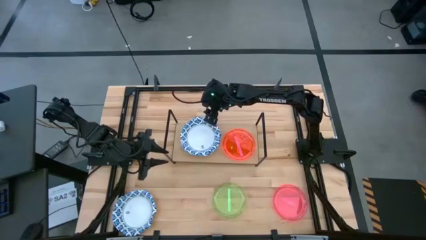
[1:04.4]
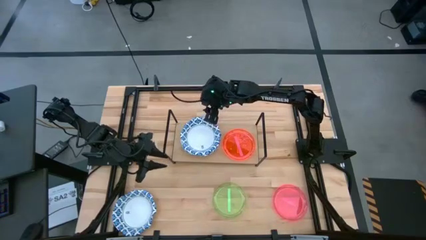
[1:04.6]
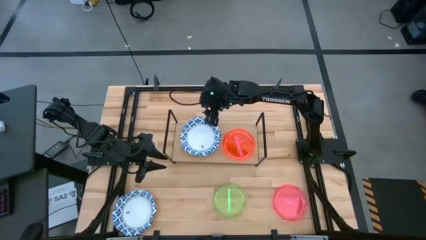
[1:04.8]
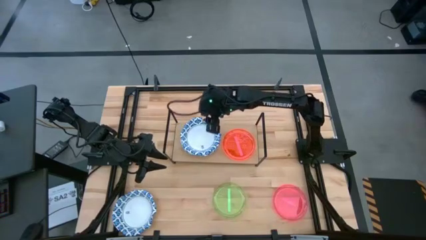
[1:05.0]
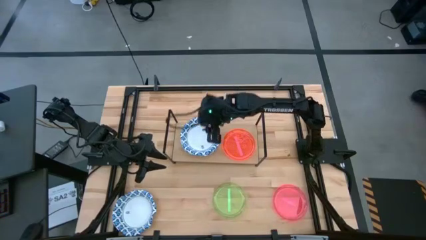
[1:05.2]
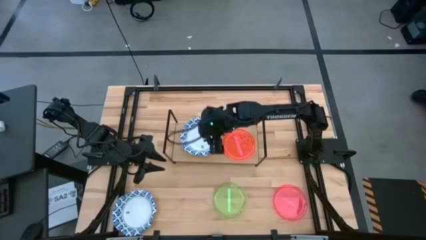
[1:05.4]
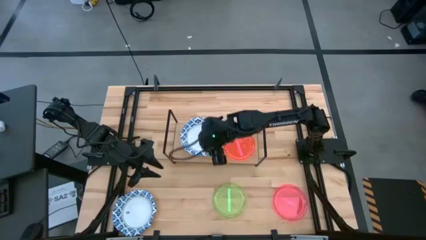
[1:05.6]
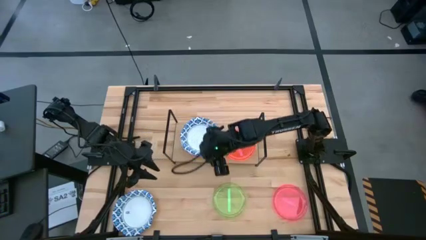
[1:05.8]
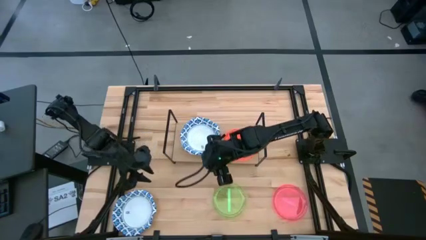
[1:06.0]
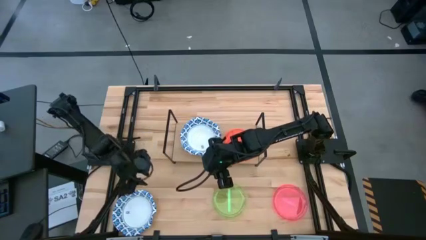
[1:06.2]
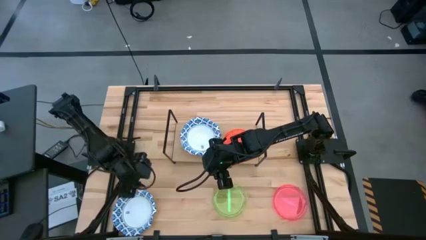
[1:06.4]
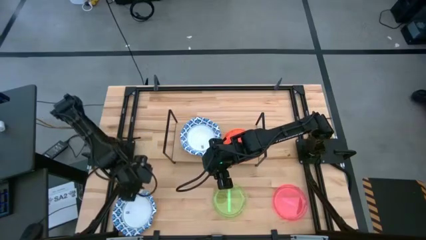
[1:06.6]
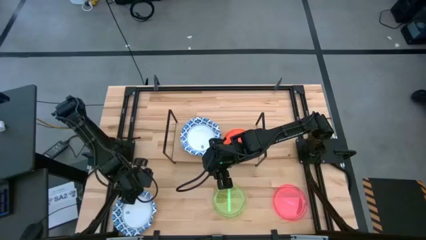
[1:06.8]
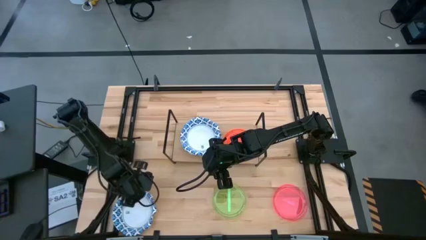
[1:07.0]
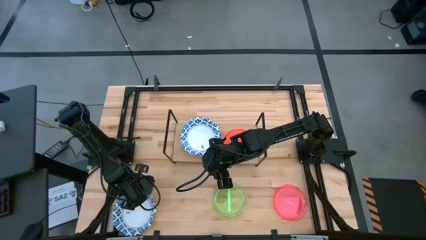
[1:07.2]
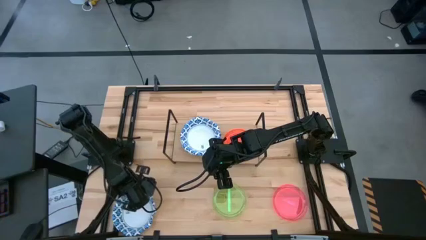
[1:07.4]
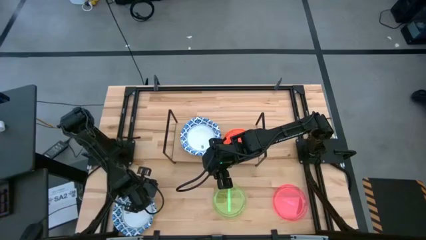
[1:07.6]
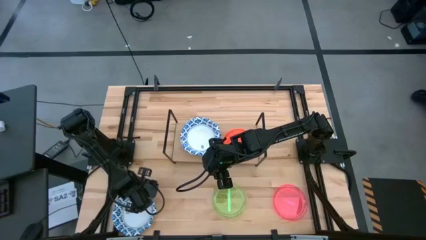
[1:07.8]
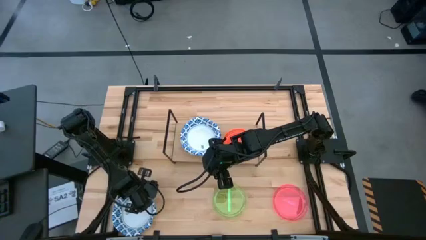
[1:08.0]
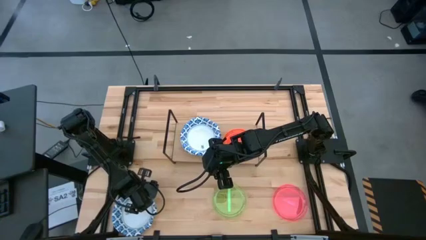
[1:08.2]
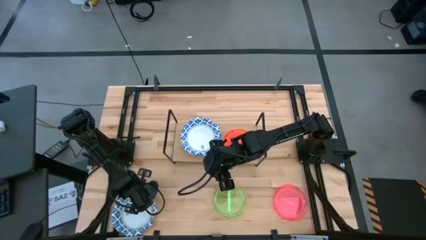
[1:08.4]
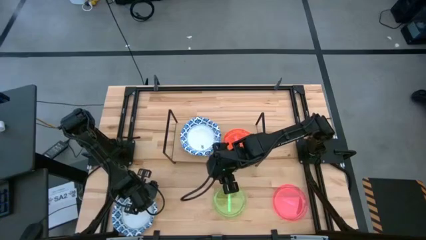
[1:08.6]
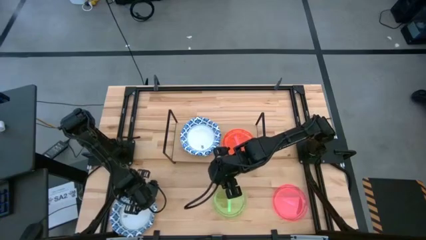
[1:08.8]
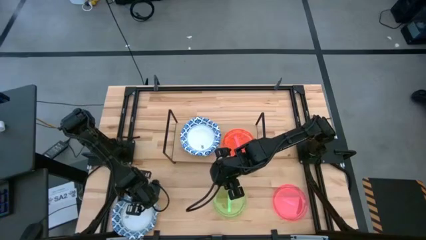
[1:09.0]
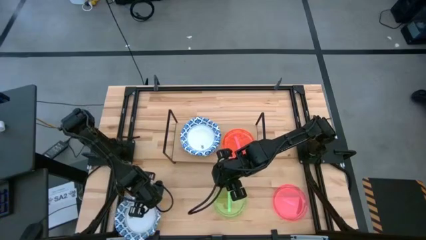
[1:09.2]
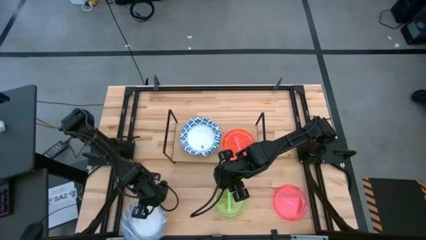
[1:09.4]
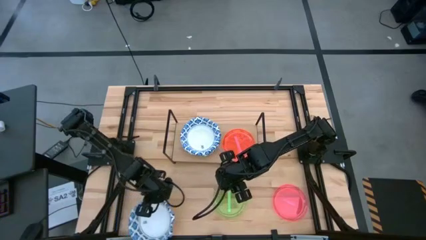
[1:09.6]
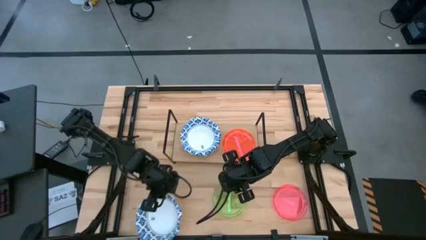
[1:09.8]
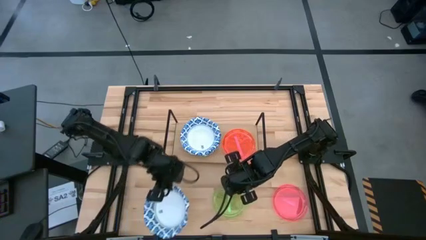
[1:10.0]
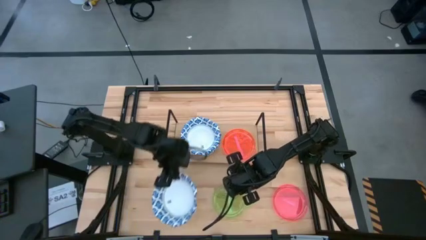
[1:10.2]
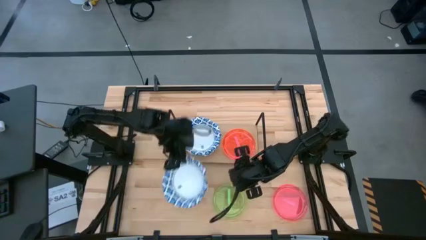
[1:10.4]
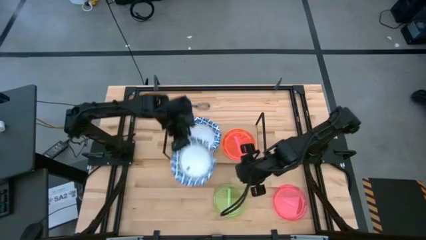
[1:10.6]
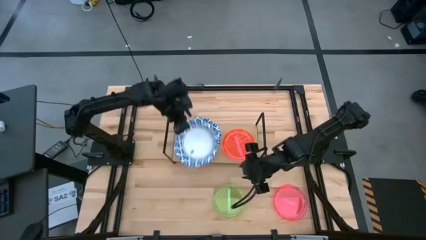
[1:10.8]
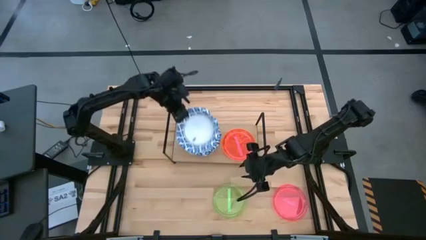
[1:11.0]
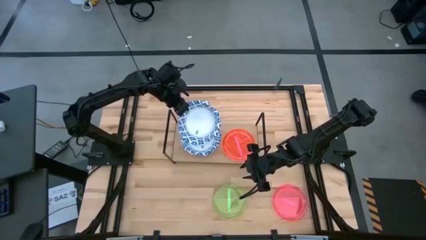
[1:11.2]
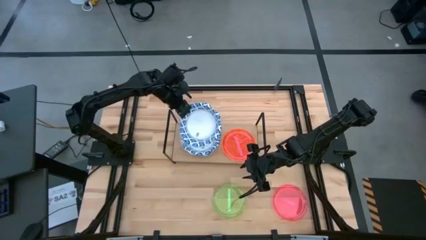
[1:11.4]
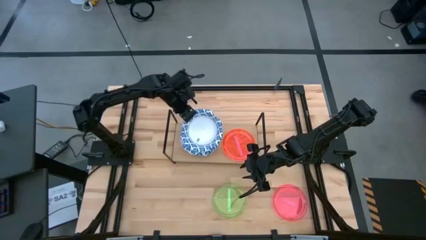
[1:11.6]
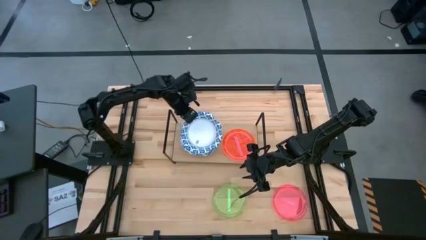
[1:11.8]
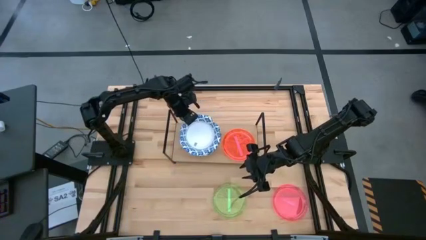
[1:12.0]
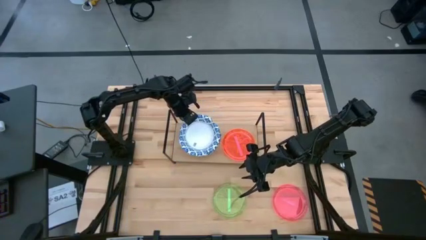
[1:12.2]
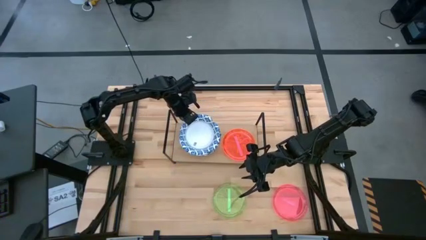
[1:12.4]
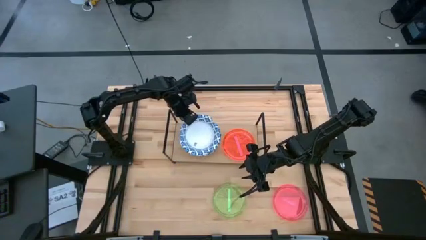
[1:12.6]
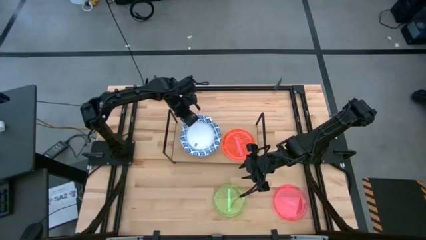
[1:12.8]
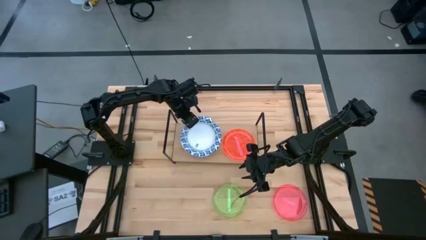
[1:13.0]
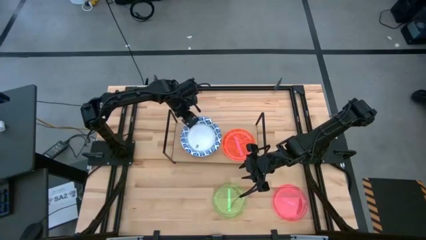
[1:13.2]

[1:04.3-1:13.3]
Task: Place and stack plates onto a shelf
Stack the blue patterned bowl on top of the blue patterned bowl on the shelf

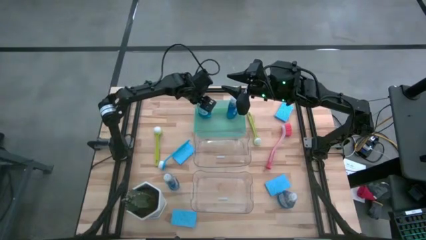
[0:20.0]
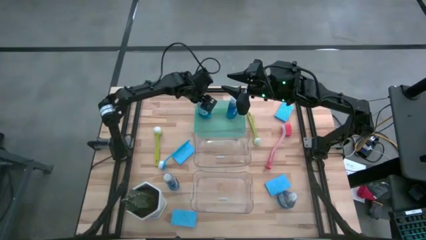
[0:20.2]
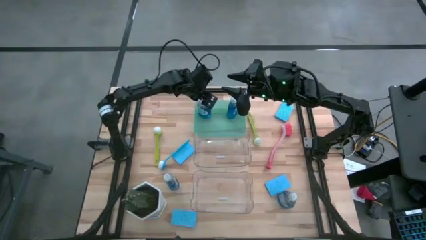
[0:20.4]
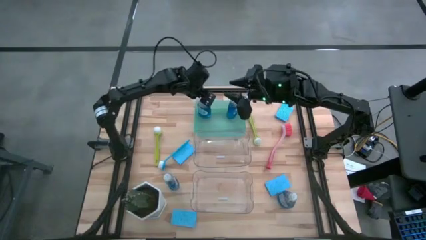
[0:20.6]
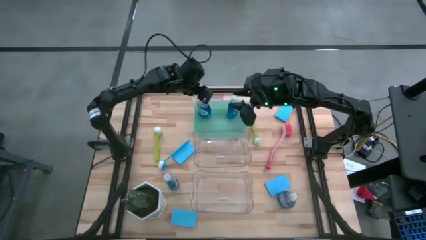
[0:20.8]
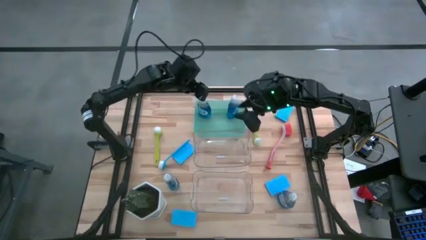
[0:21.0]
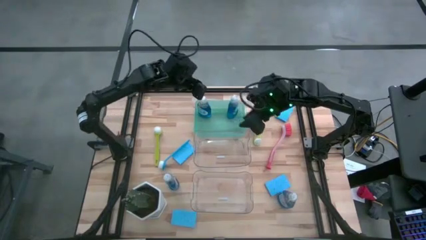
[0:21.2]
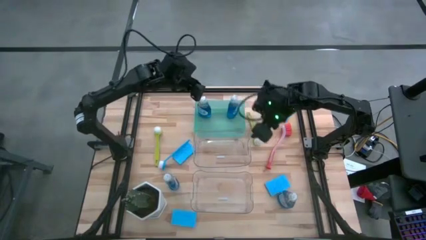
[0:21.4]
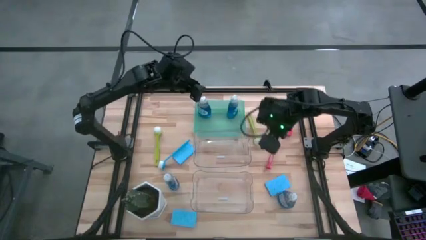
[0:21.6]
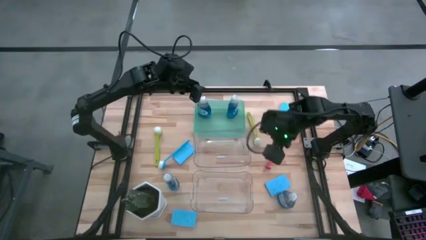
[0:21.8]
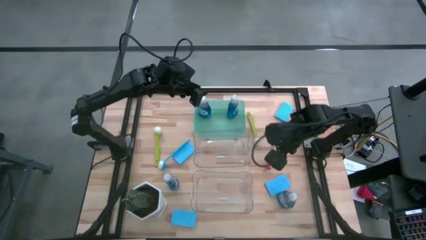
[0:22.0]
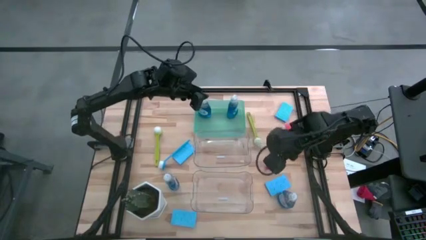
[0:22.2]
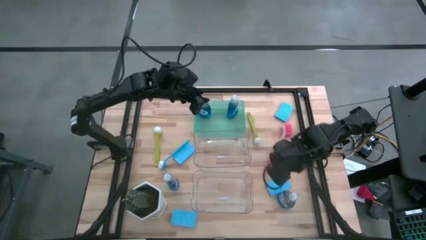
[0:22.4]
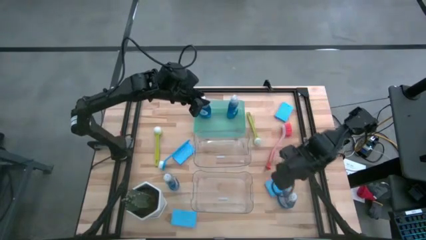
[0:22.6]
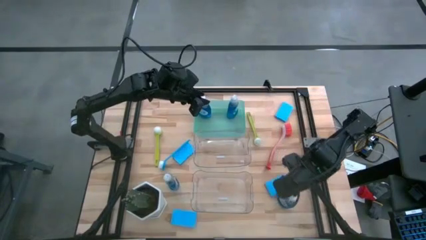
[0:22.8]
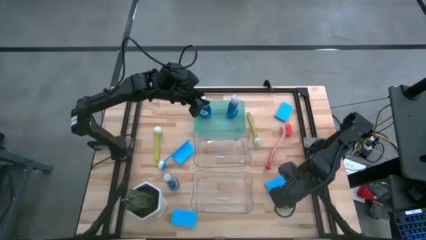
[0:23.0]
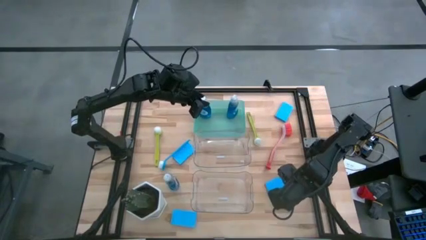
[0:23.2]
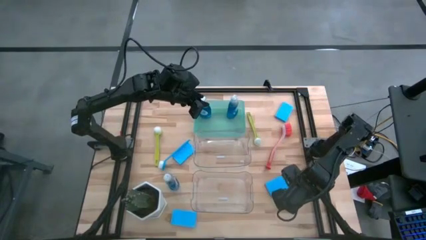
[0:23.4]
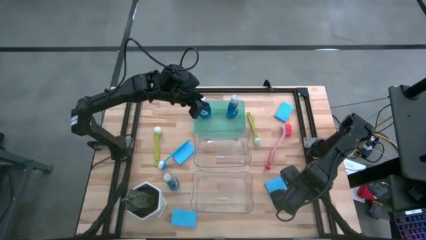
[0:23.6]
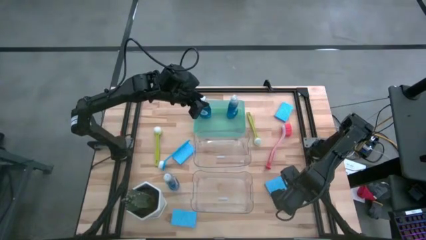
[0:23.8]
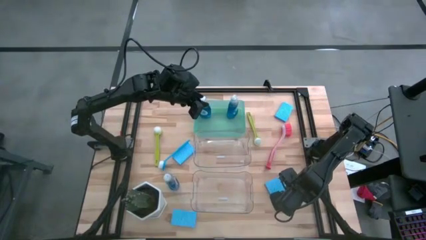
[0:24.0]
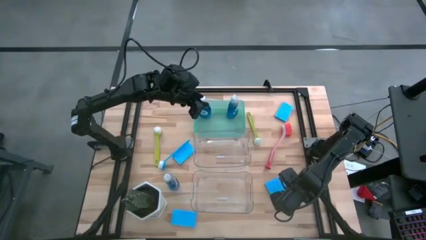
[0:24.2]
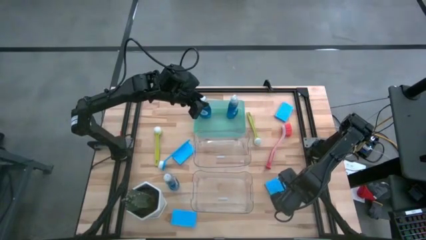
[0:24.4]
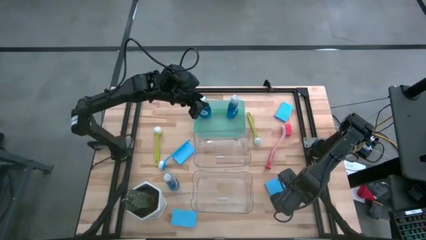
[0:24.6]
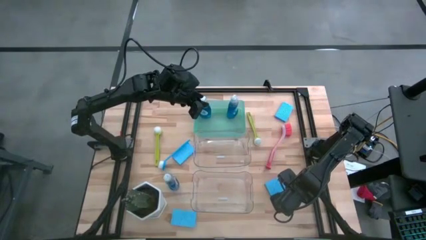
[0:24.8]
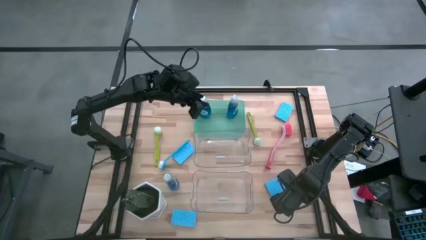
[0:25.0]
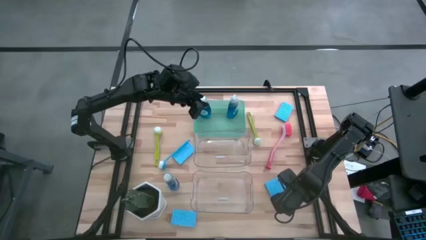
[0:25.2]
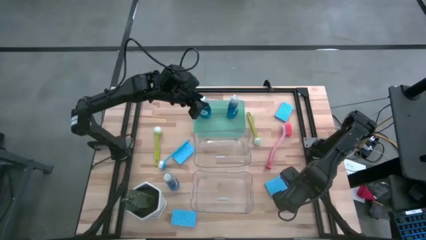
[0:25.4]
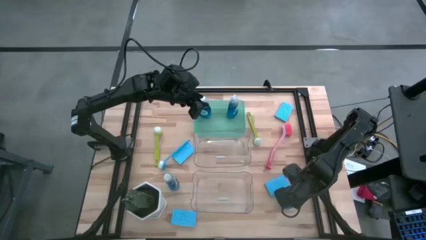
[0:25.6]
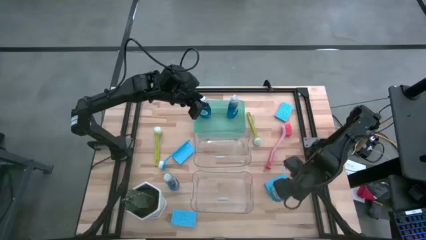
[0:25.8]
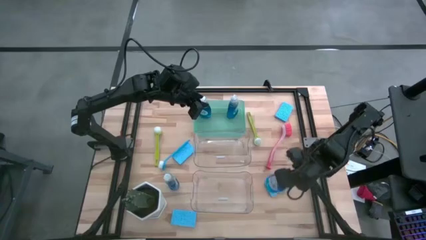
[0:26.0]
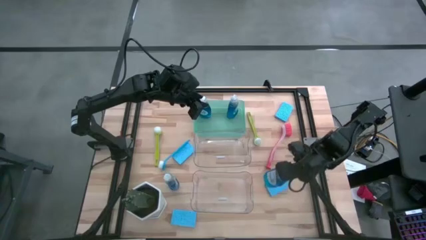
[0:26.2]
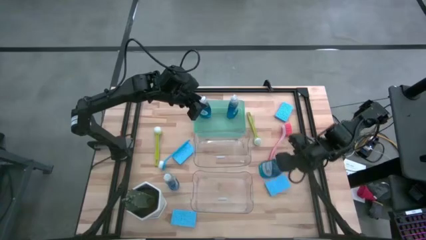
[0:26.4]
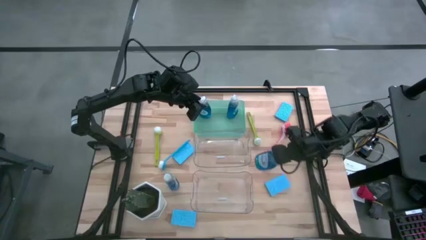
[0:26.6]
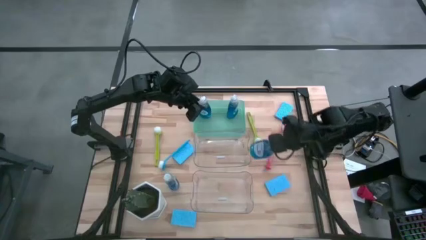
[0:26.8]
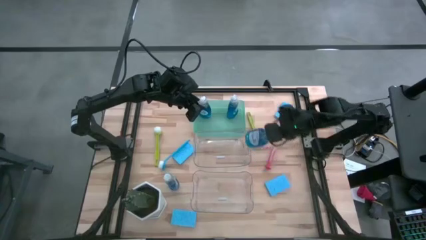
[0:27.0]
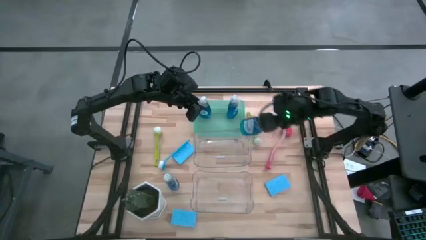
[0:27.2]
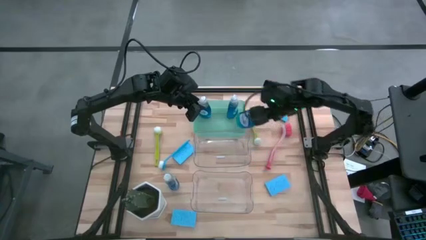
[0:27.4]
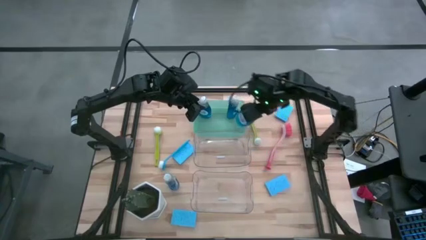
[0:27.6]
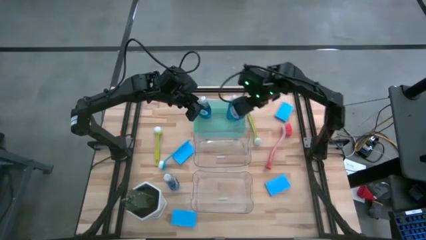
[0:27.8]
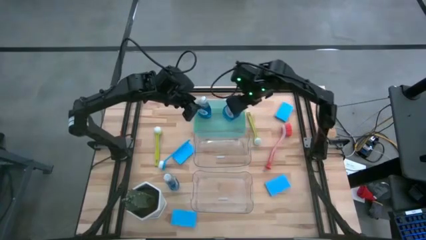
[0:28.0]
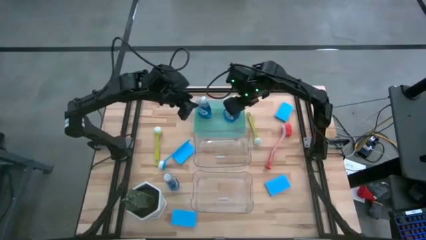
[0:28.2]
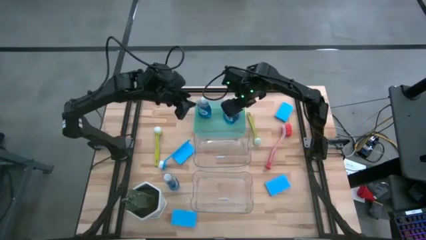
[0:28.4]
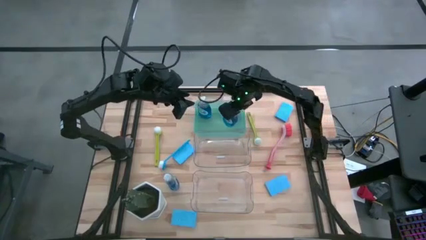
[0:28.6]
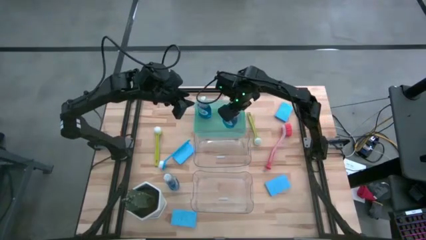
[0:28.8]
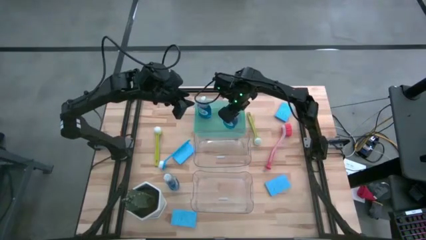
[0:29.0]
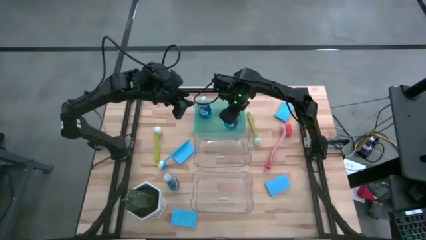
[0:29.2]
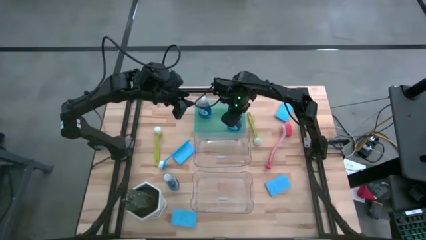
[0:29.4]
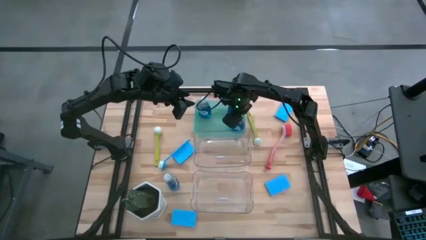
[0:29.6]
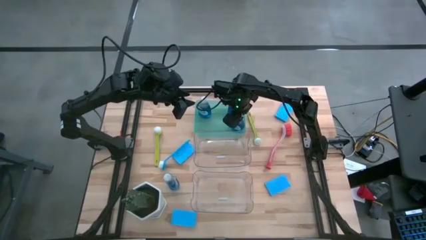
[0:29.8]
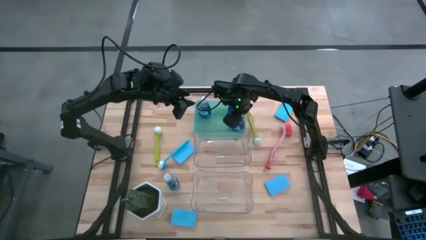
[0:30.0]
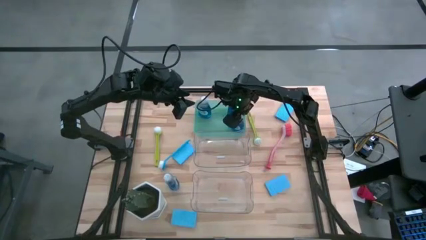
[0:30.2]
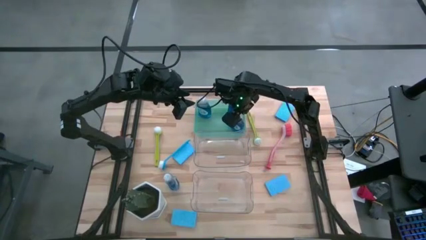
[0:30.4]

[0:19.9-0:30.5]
Task: Pick & Place Kitchen Sink Supplies
Put the blue dishwashing liquid into the green bin
